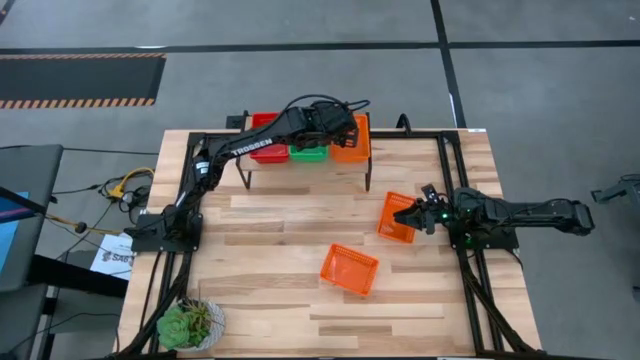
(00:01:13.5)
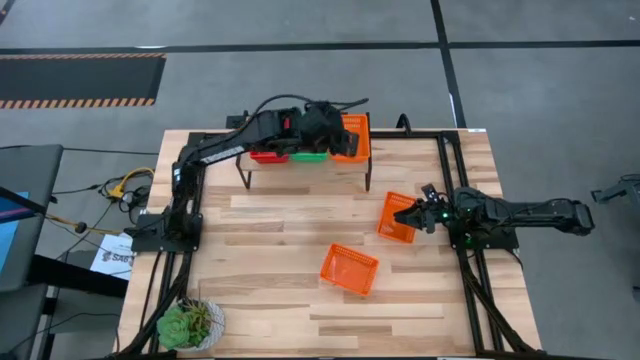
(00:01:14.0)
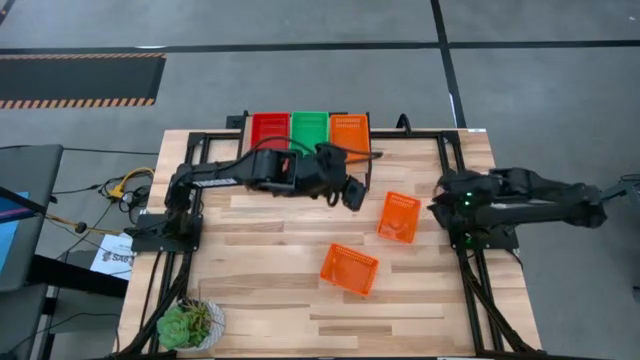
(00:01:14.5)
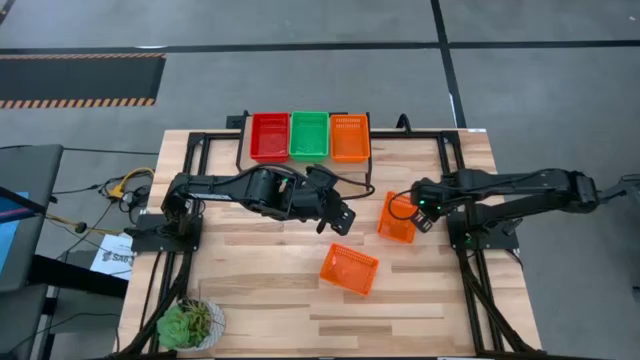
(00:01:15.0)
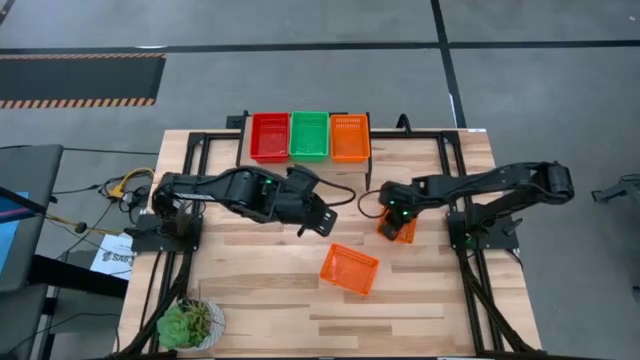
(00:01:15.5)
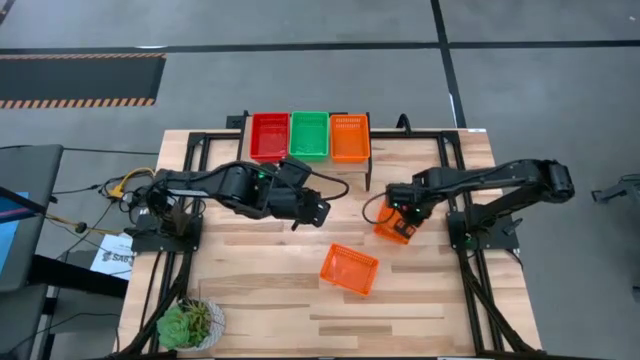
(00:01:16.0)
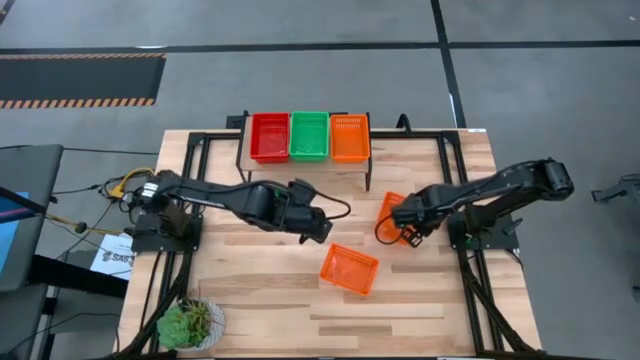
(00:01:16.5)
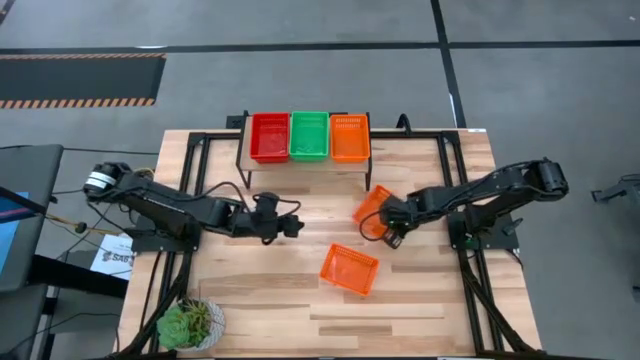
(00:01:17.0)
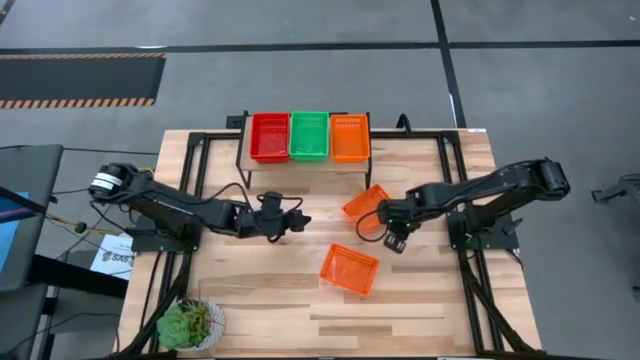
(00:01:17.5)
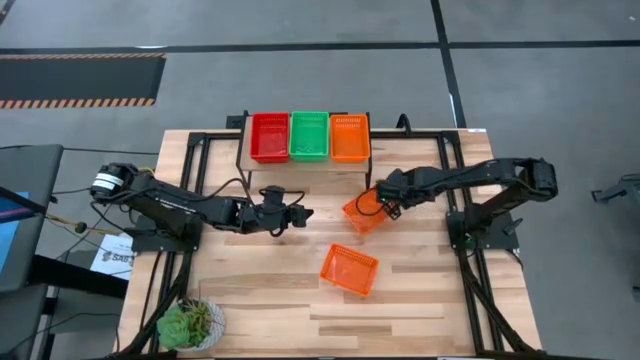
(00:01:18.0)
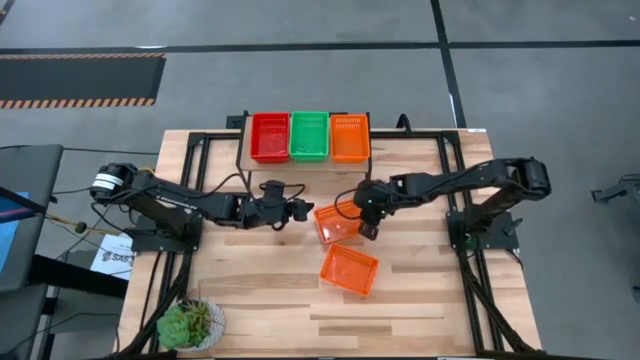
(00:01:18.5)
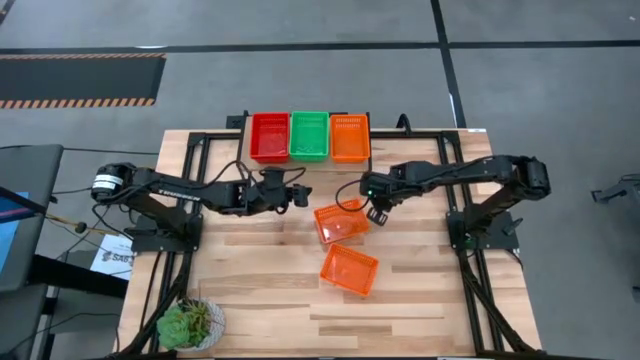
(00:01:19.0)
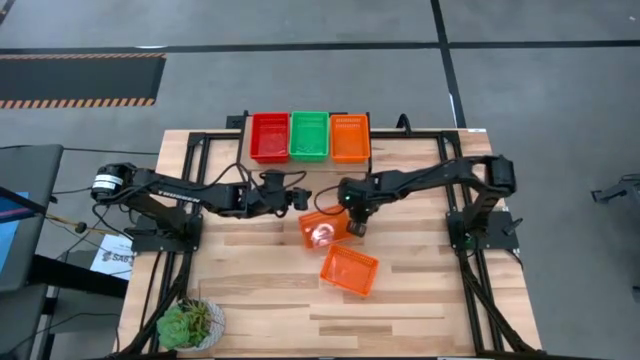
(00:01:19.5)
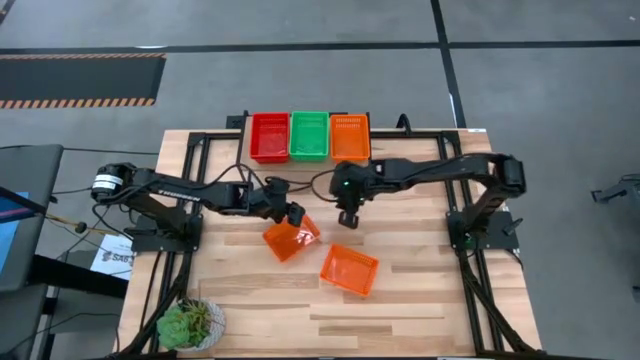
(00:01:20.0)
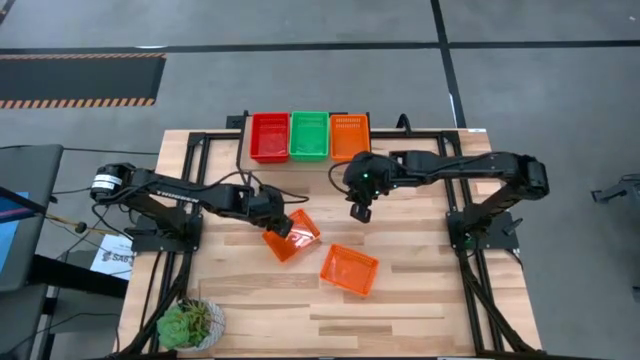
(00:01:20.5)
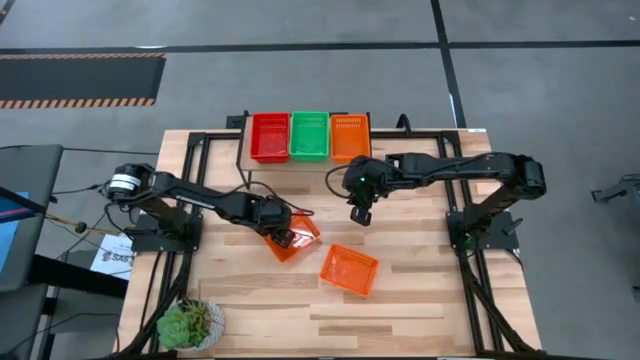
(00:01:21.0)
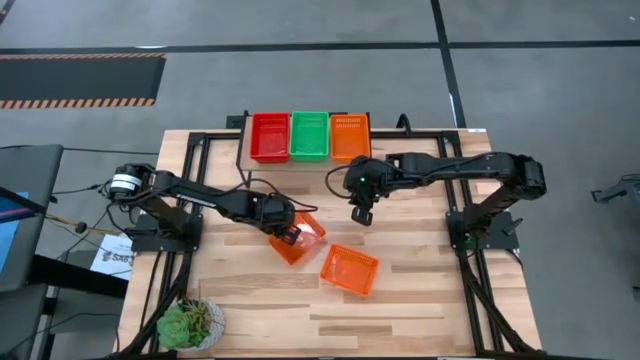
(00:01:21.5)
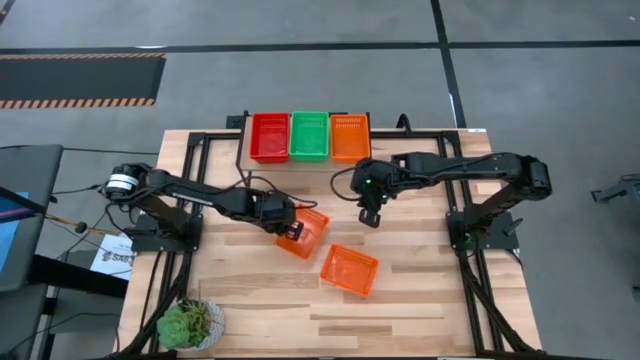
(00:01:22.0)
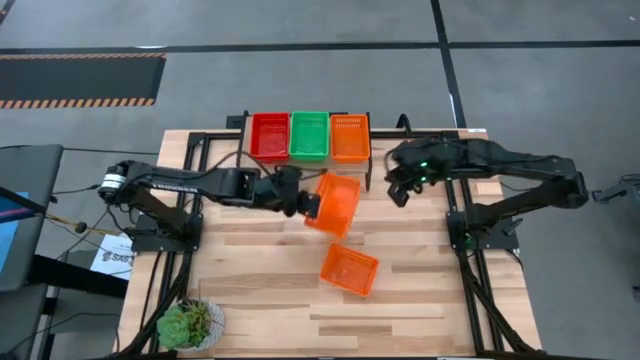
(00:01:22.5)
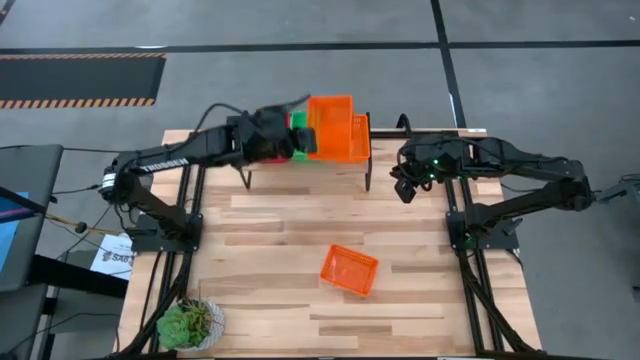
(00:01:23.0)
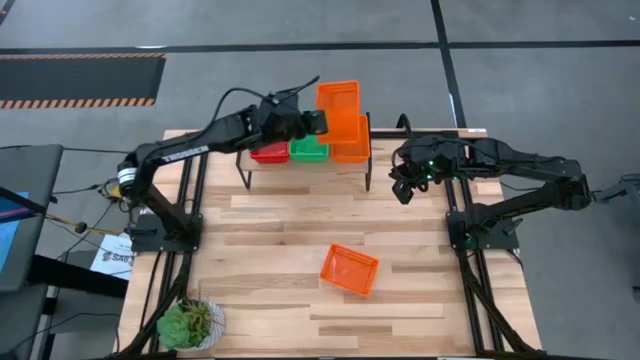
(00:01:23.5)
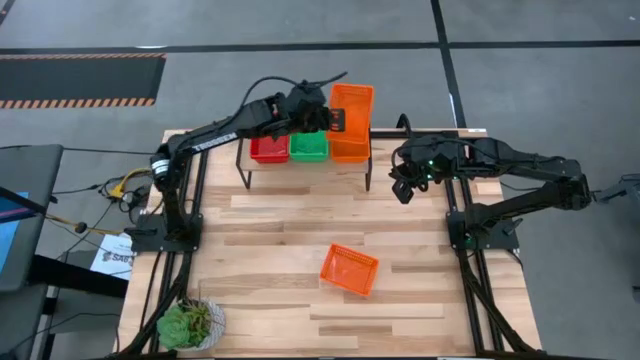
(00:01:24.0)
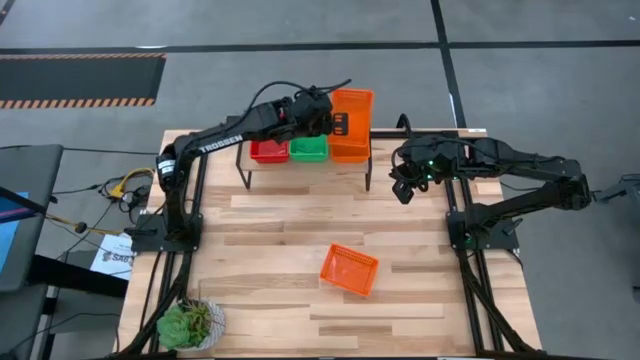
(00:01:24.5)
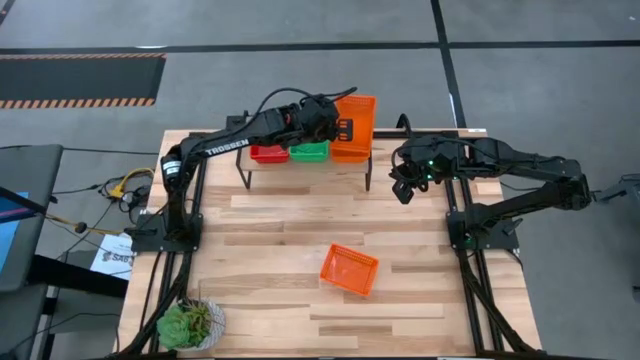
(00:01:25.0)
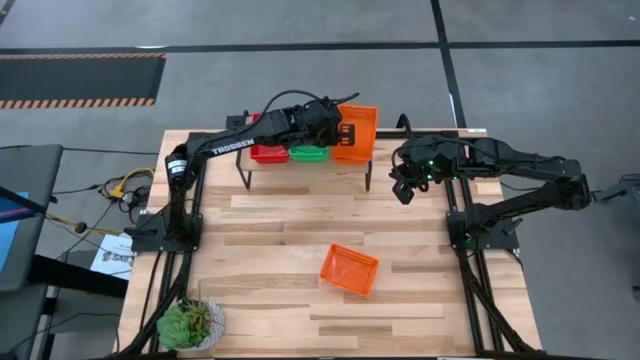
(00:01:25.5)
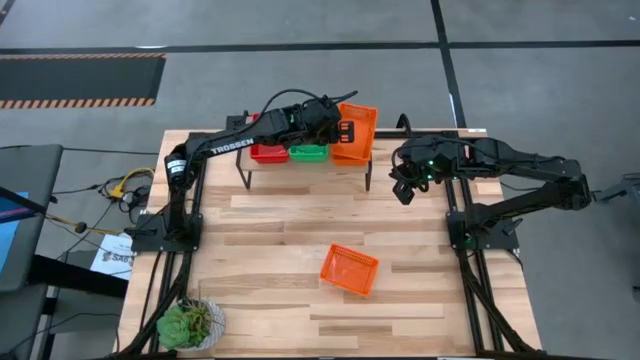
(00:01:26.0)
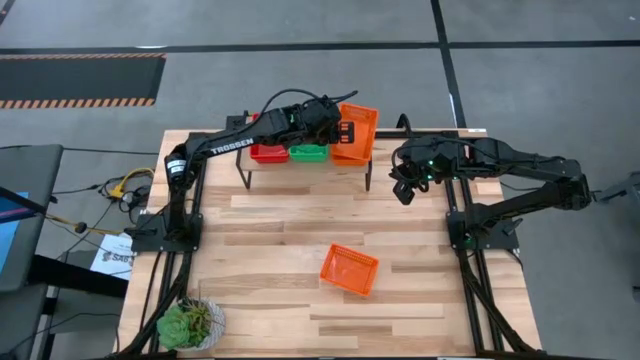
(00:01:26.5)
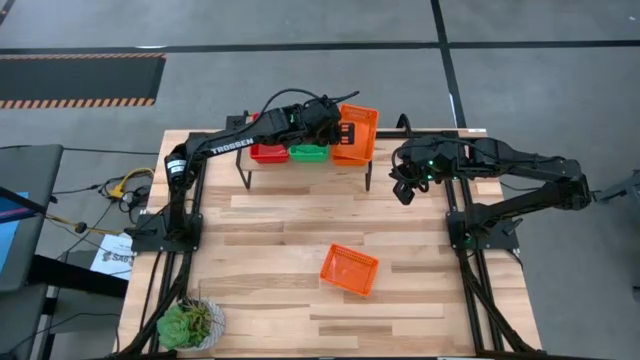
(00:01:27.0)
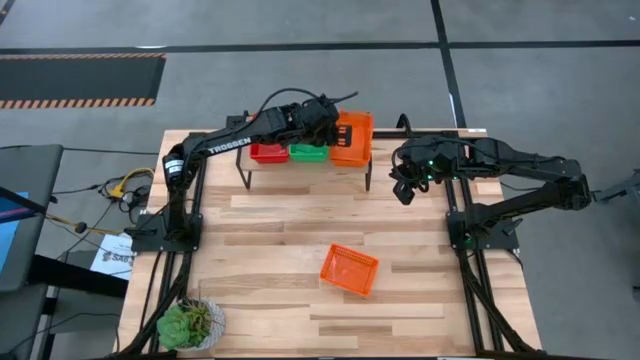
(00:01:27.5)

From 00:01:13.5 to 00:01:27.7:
Task: Stack baskets on shelf by color
Stack the top orange bin on top of the orange bin on the shelf

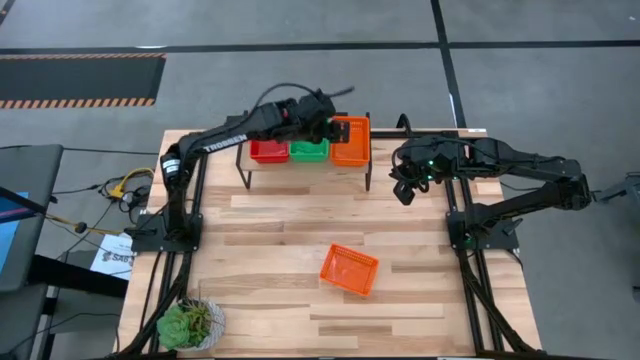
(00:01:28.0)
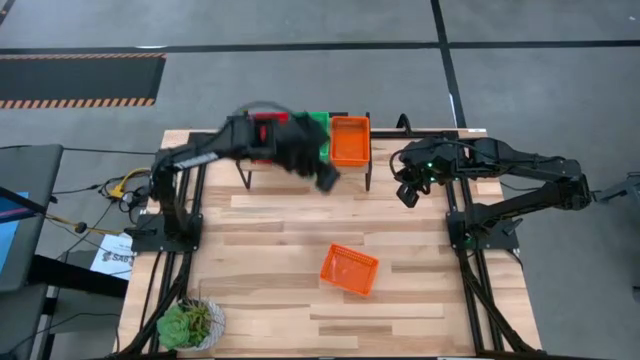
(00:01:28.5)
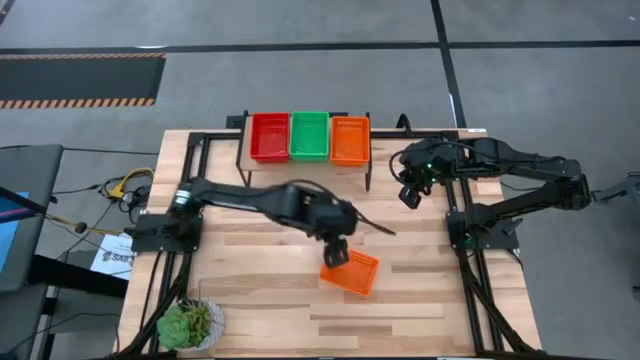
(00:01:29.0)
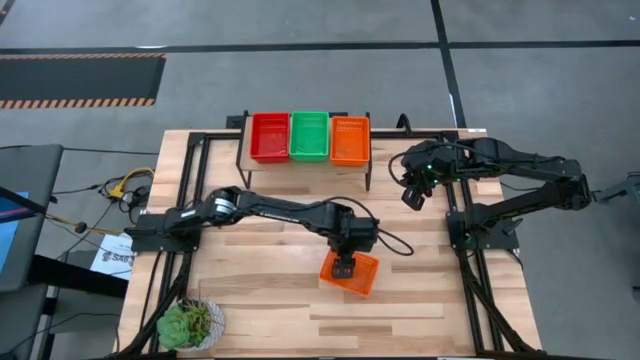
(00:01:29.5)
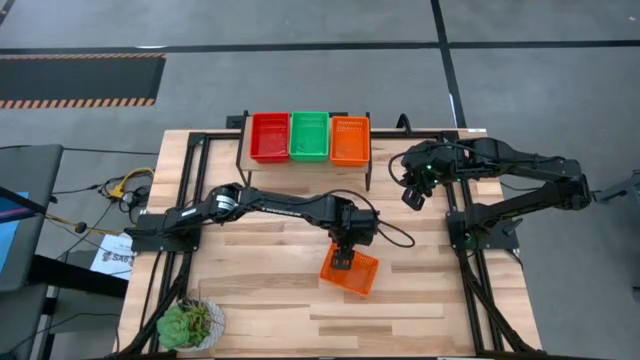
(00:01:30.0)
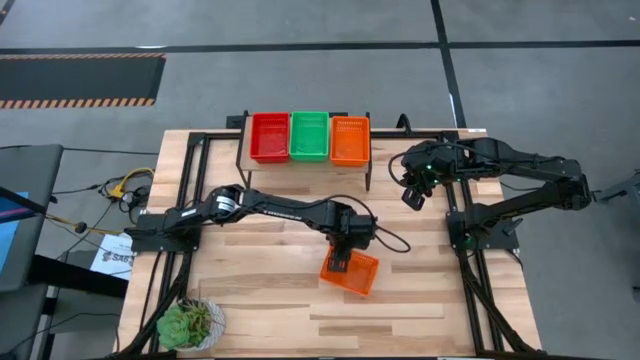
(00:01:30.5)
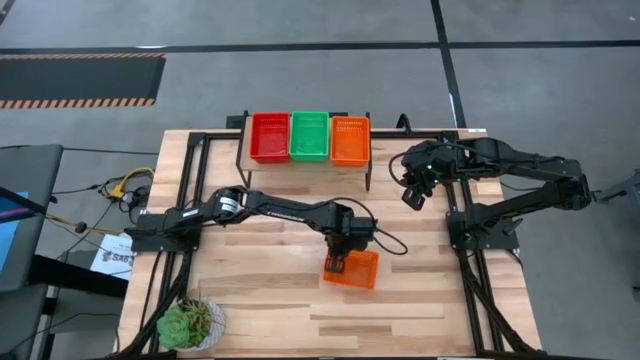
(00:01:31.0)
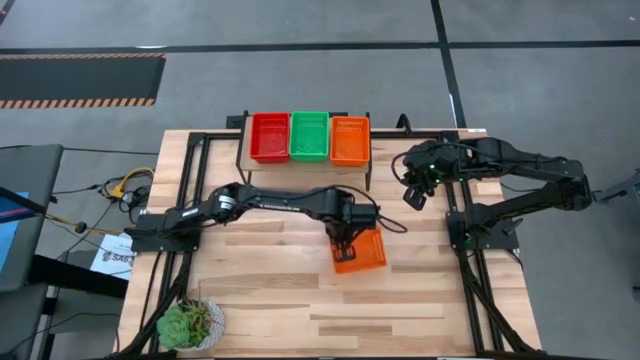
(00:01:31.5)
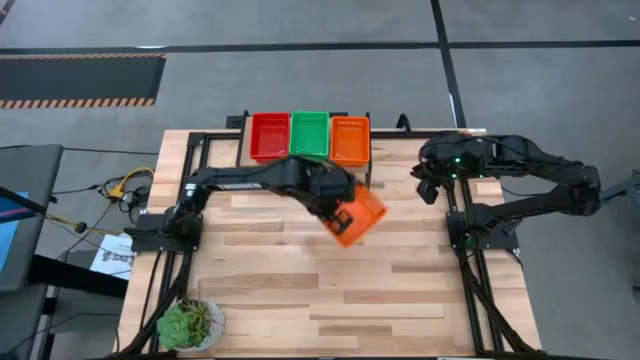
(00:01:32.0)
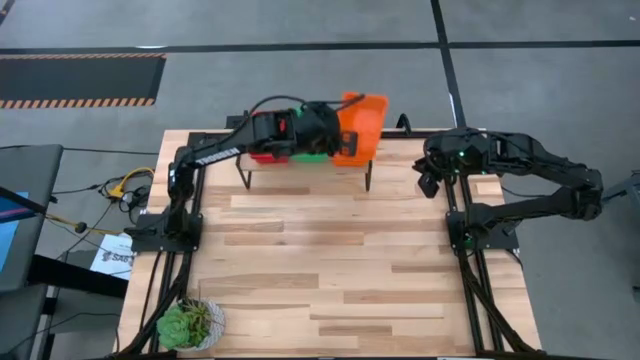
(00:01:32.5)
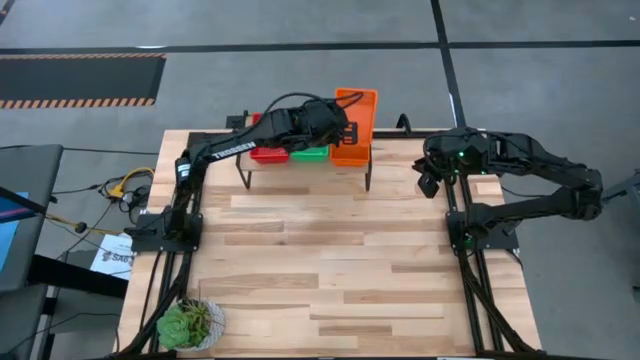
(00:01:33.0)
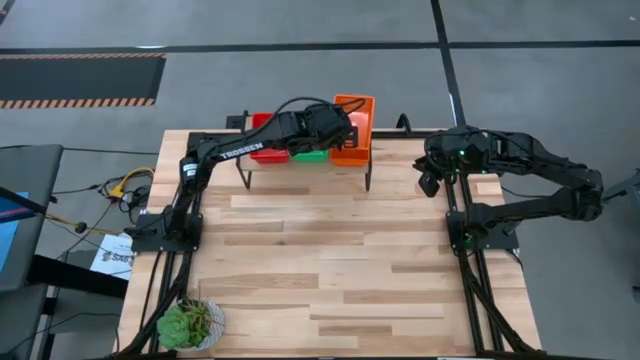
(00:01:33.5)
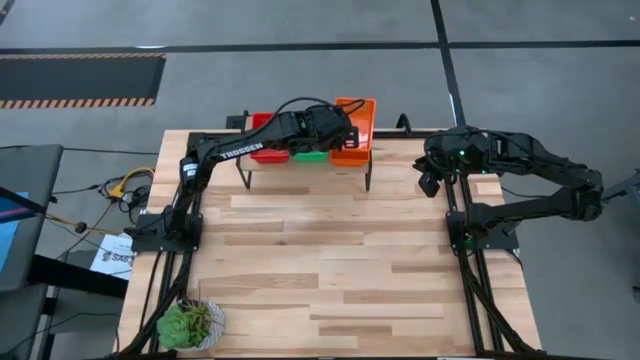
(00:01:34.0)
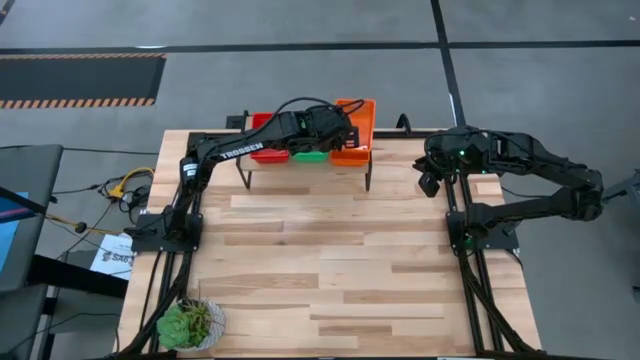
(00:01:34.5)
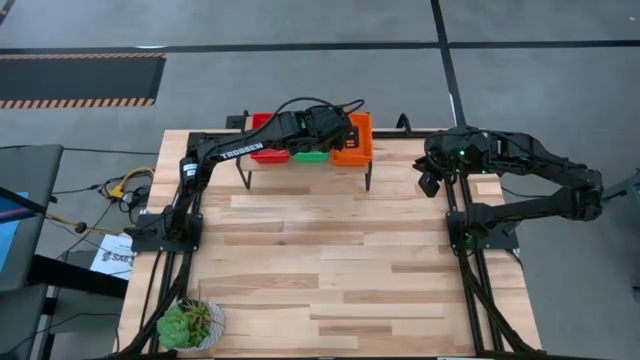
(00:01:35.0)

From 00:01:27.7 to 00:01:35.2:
Stack the orange bin on top of the orange bin on the shelf
